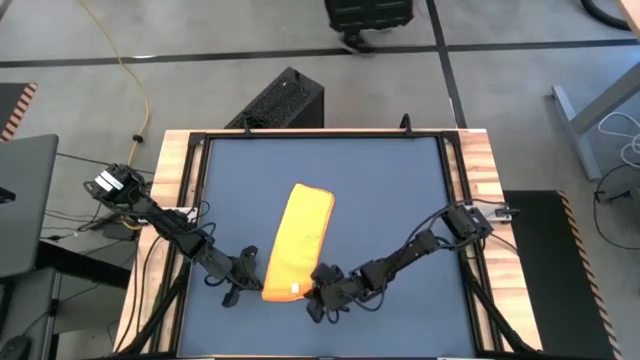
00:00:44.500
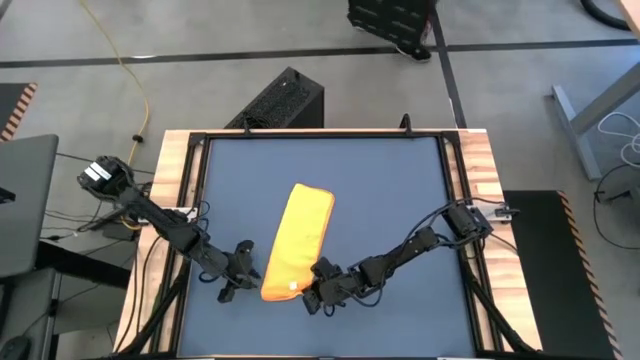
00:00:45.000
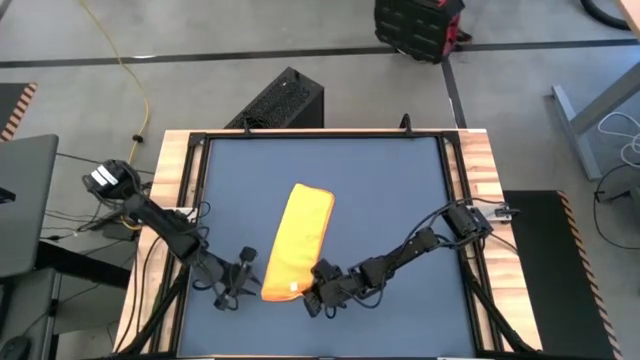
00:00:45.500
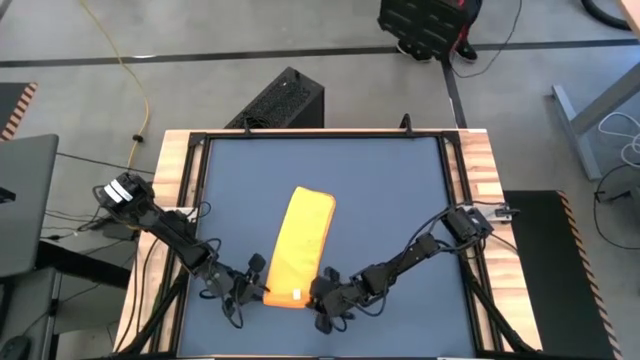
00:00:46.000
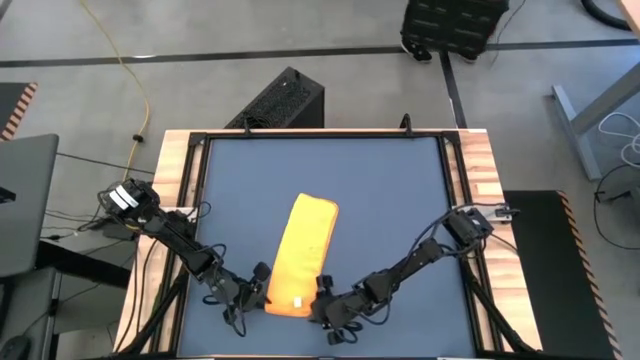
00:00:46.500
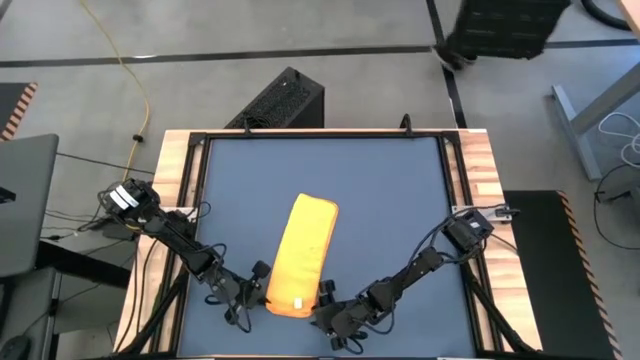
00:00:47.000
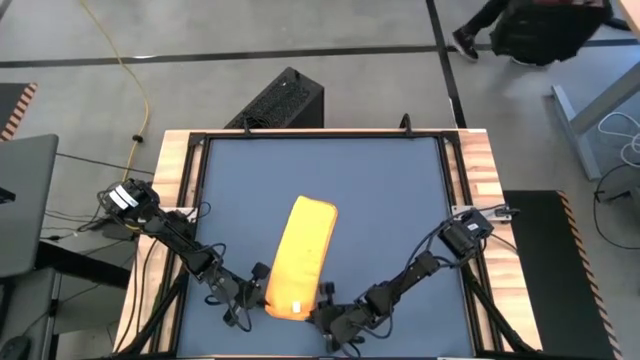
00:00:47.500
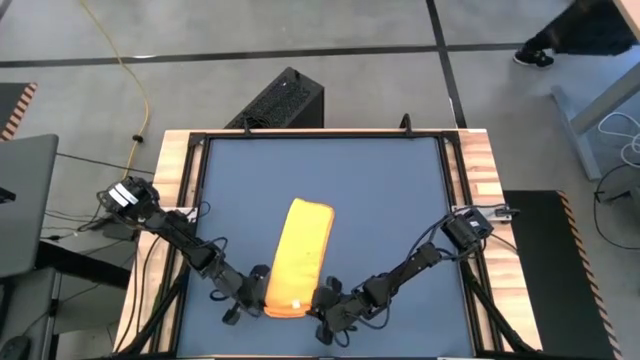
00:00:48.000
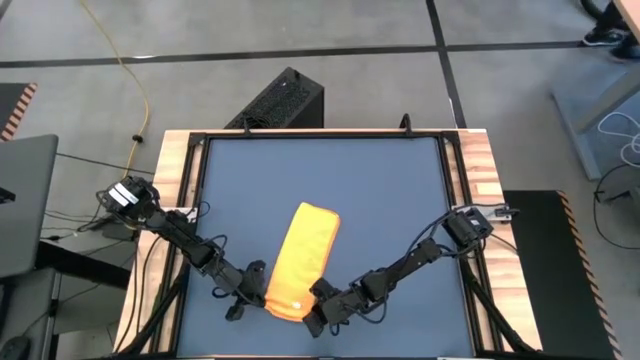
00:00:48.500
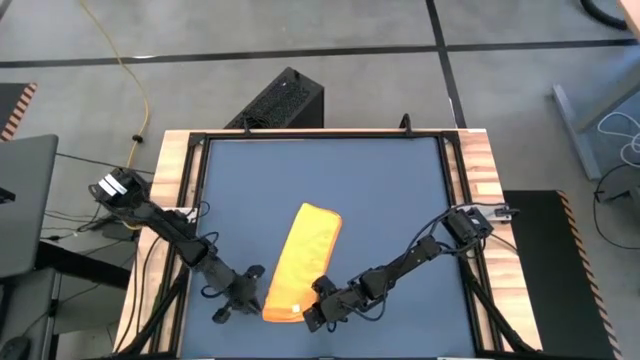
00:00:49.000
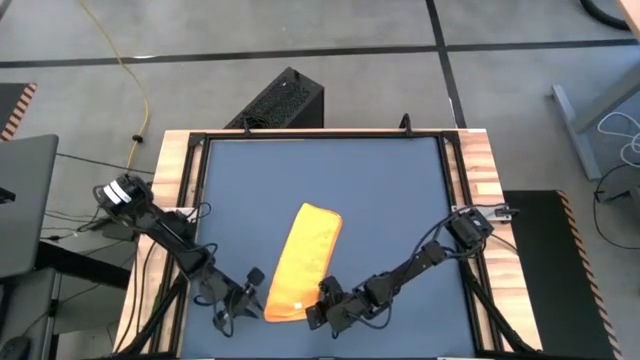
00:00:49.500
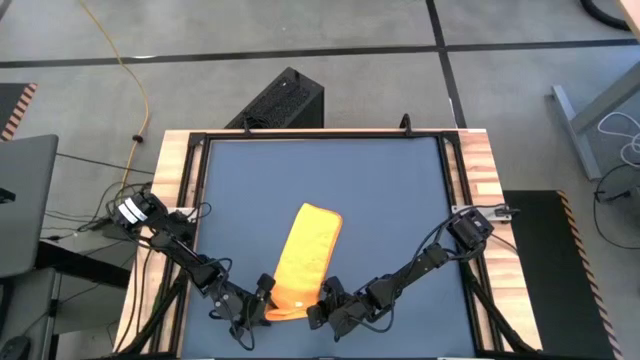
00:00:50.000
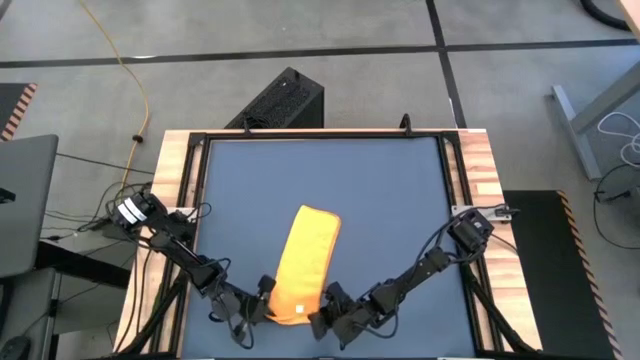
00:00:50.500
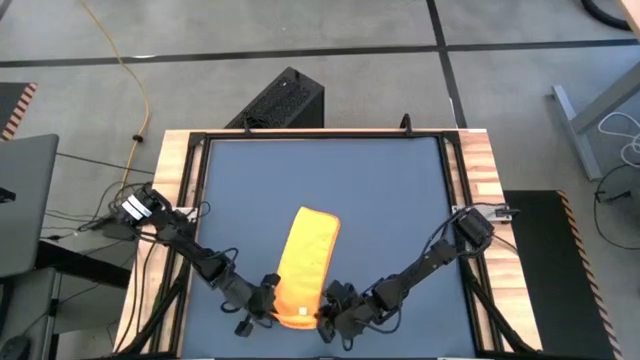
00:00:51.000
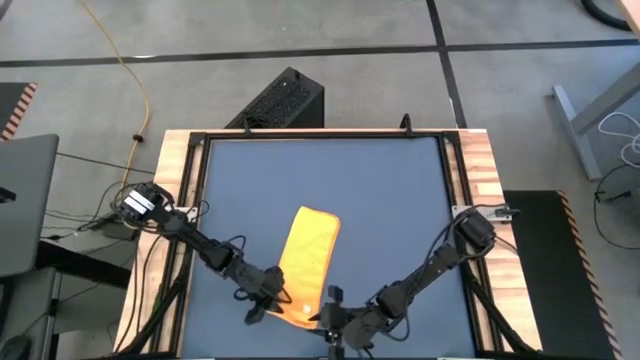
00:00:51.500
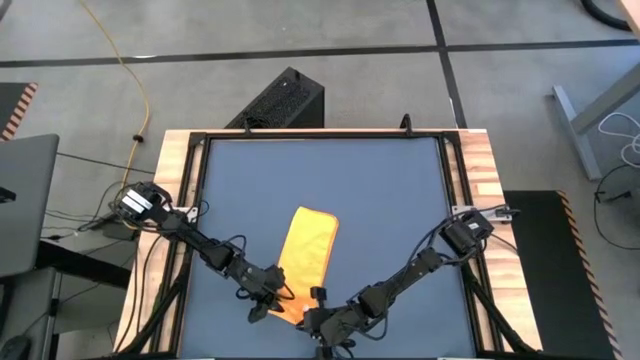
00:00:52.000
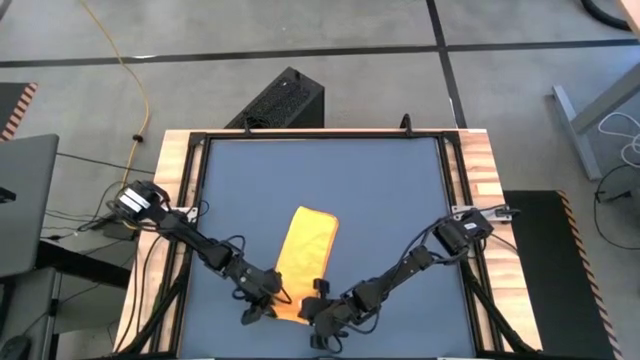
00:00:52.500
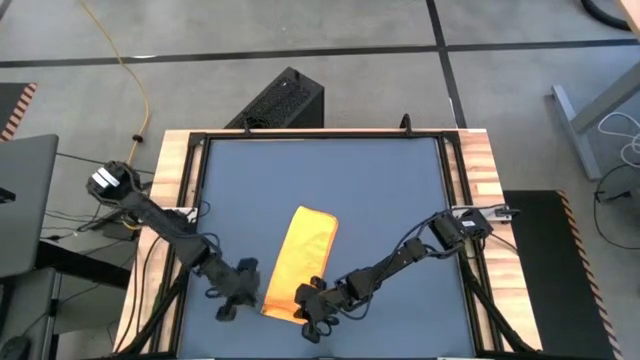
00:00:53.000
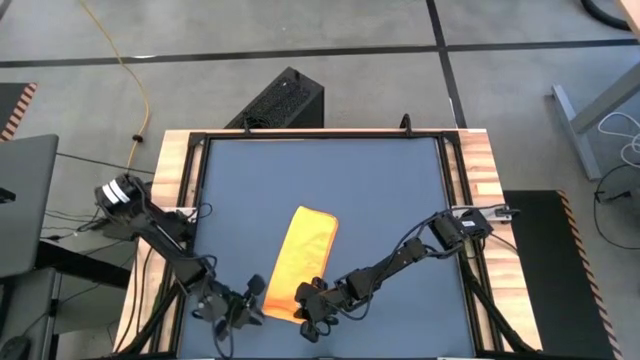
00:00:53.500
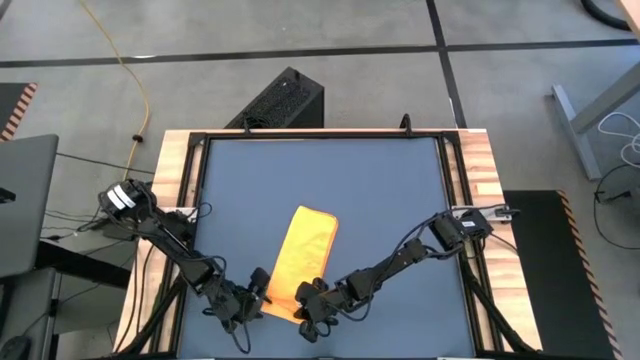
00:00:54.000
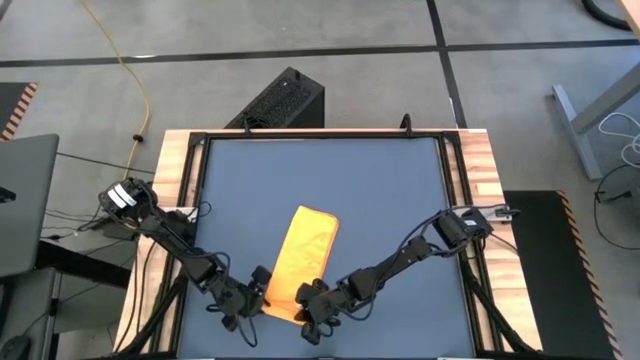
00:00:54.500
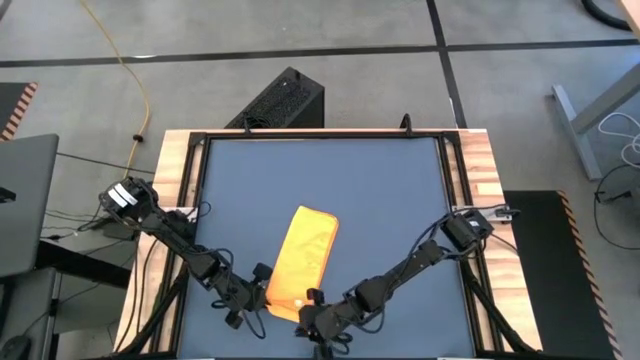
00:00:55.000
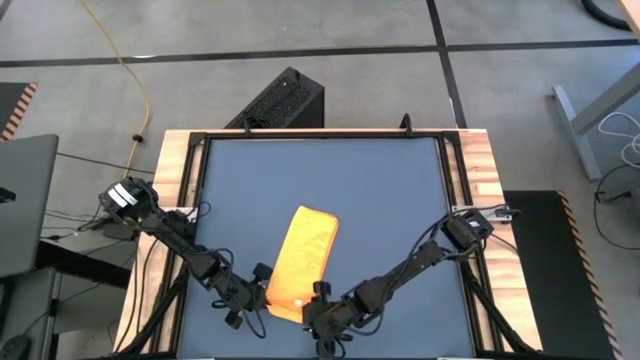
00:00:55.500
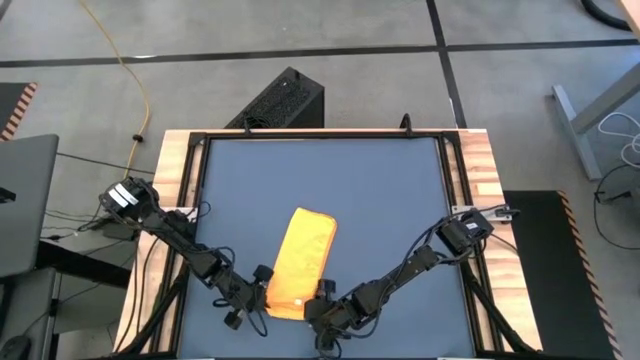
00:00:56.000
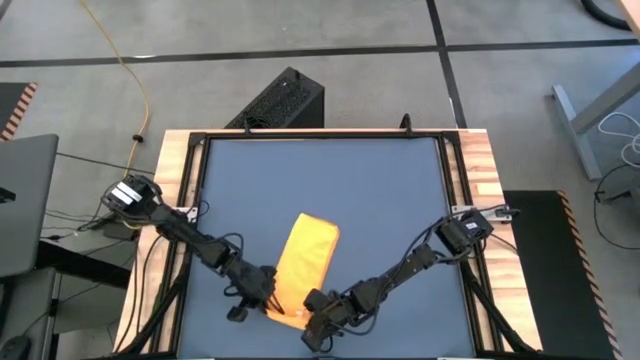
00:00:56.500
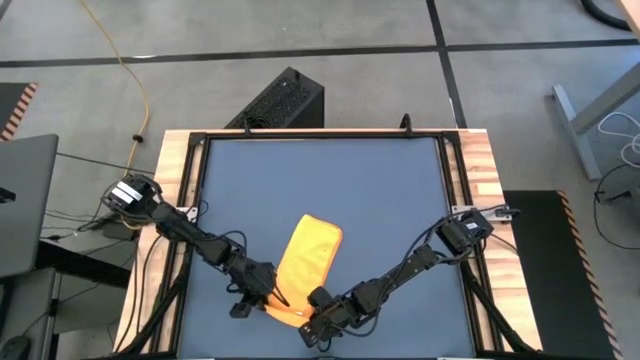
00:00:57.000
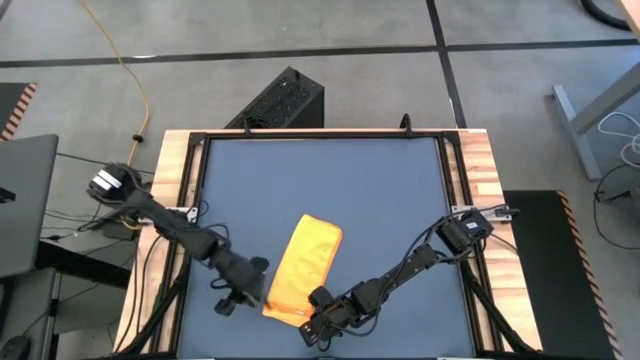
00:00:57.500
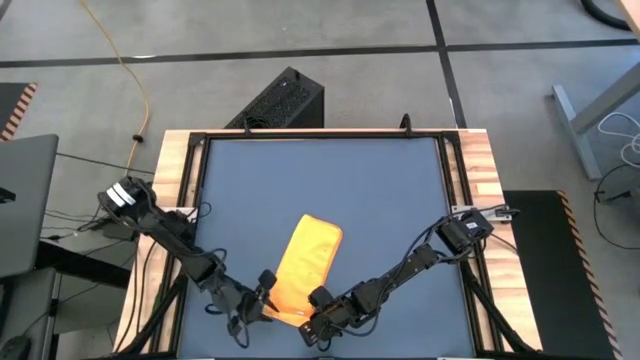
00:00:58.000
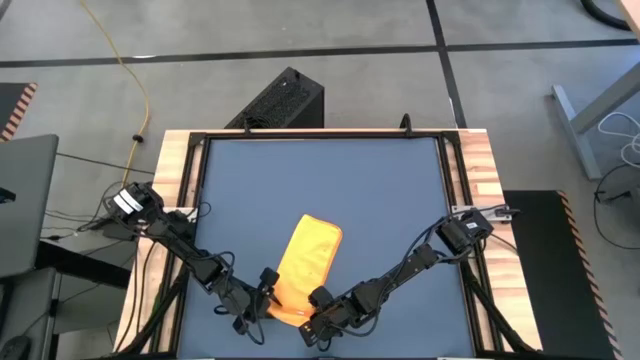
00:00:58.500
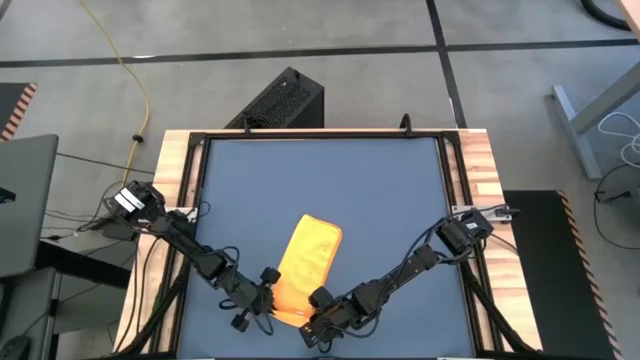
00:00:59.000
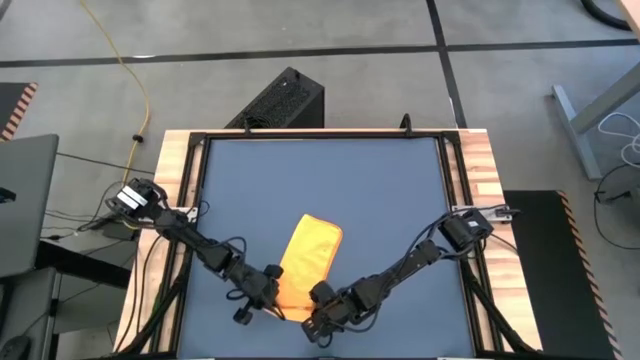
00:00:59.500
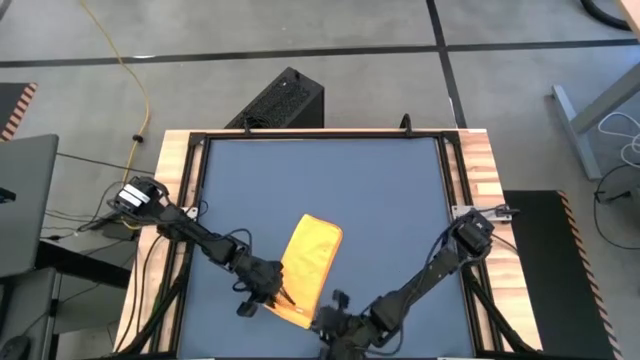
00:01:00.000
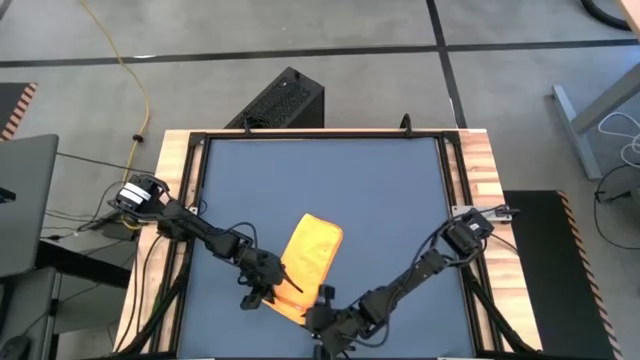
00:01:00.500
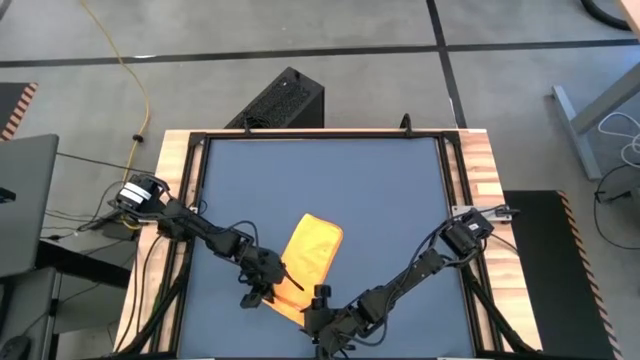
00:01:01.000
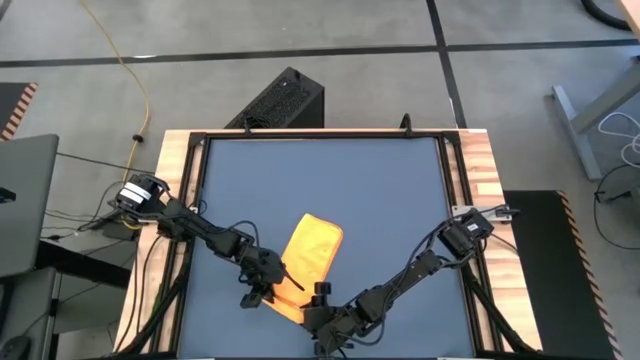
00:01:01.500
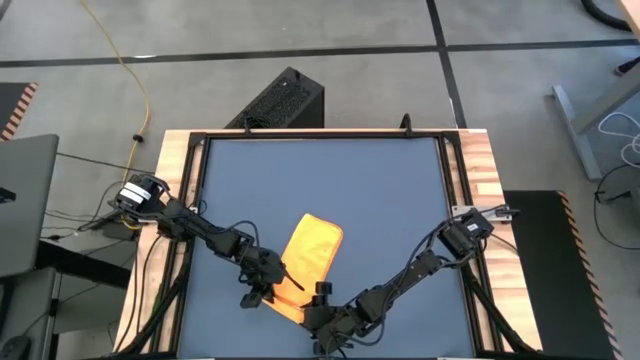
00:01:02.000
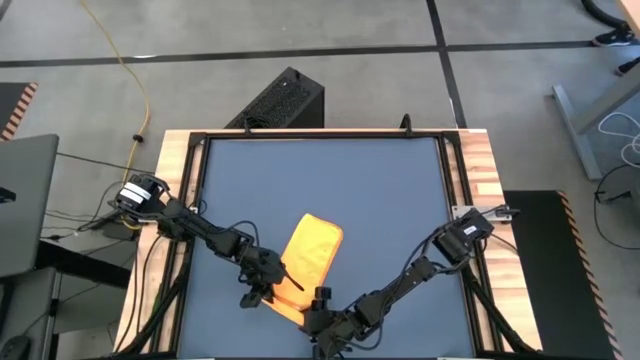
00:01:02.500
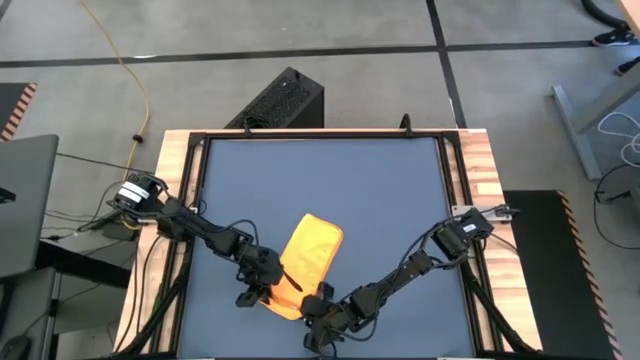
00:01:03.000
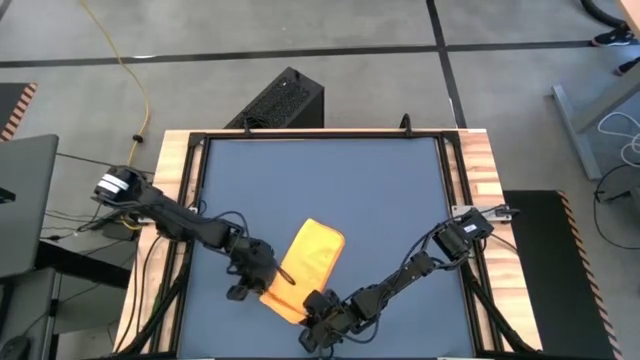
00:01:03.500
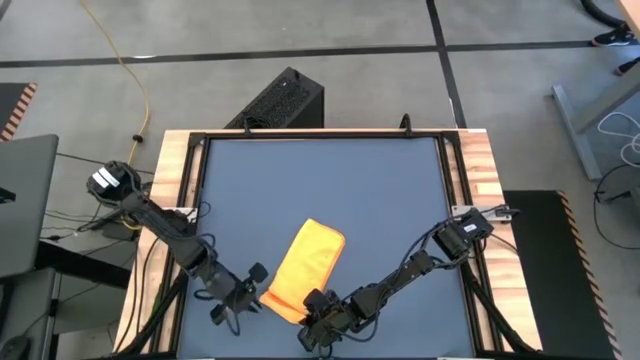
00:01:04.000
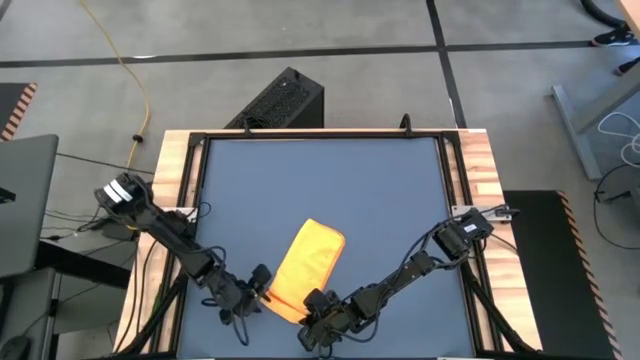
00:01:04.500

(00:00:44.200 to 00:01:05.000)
Task: Roll towel
Roll the orange microfiber towel

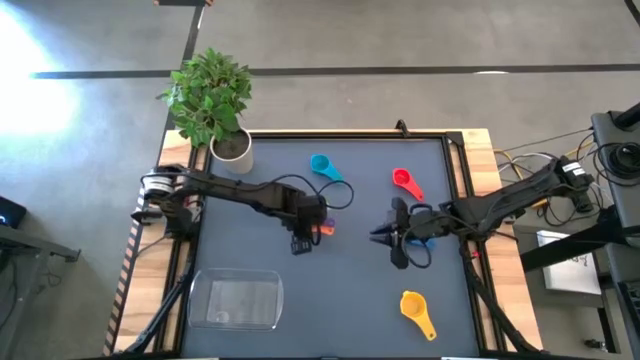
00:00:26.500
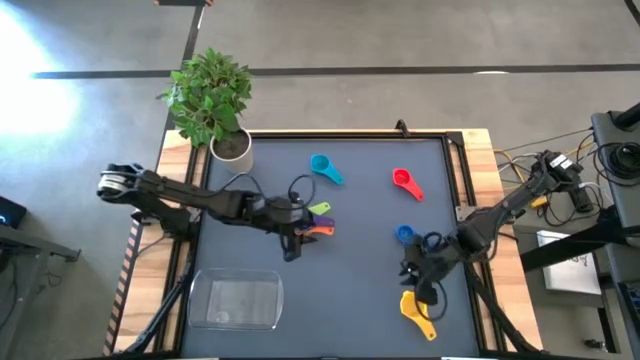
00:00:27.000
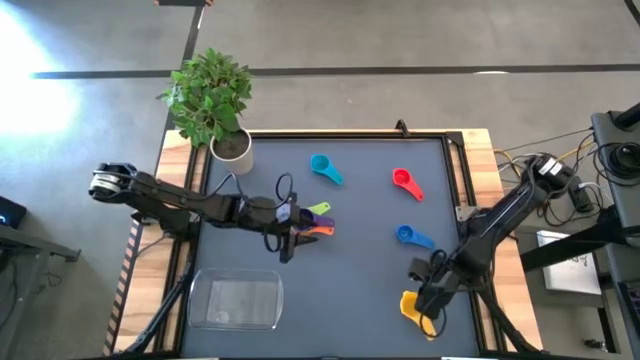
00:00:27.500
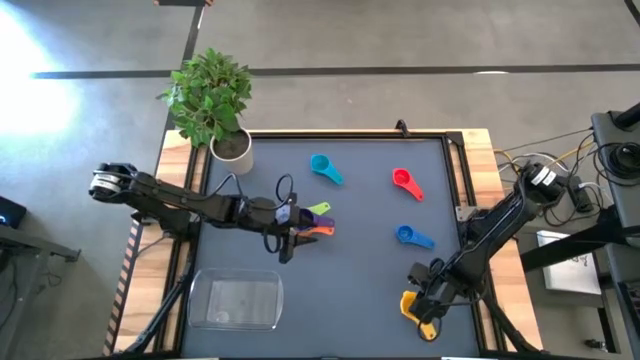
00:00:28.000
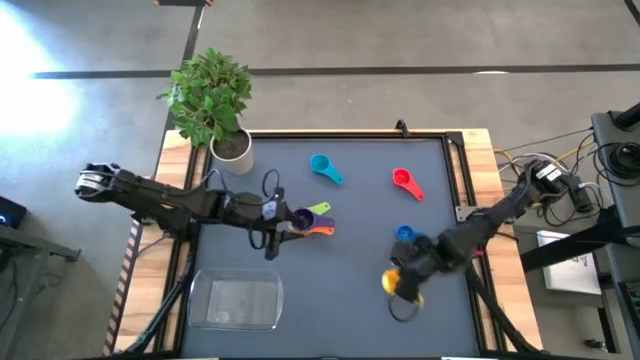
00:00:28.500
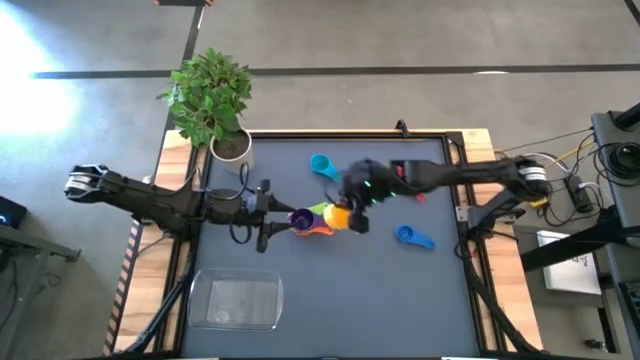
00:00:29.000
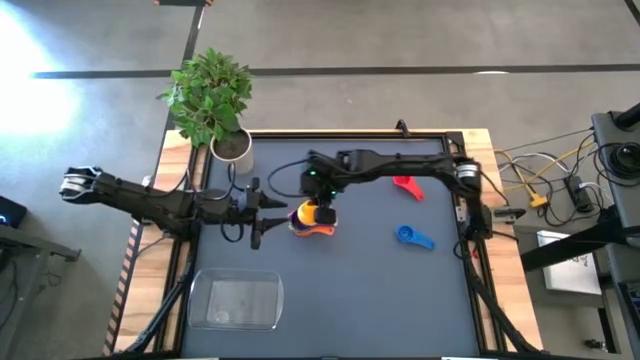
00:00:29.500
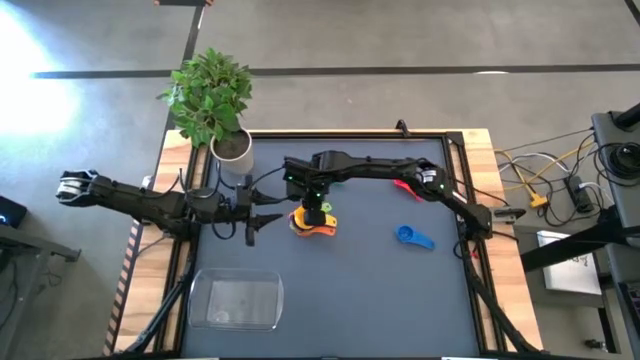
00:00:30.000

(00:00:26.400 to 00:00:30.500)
Task: Nest measuring cups in basket
Stack the yellow measuring cup on top of the purple measuring cup
